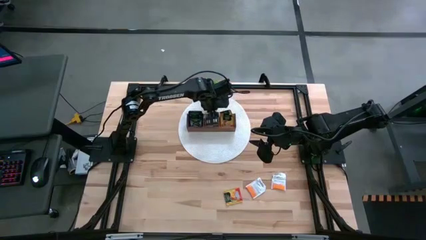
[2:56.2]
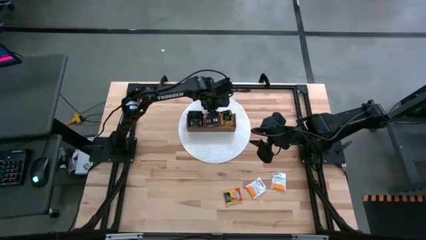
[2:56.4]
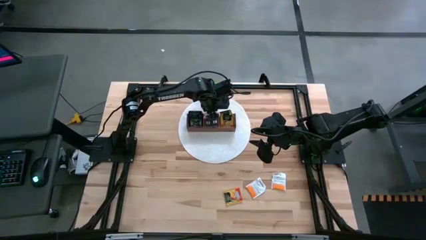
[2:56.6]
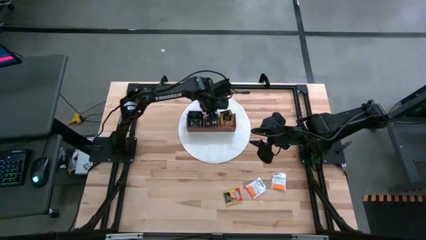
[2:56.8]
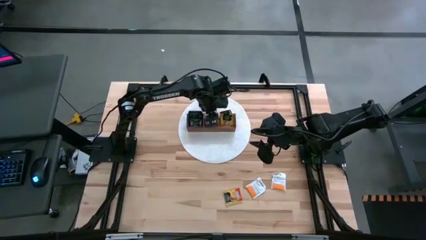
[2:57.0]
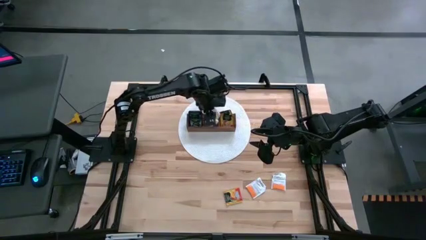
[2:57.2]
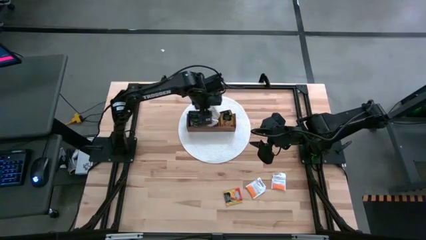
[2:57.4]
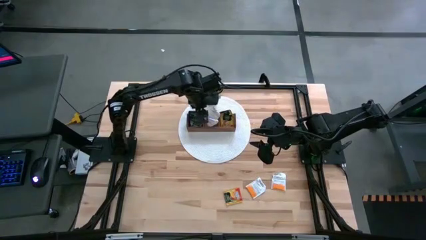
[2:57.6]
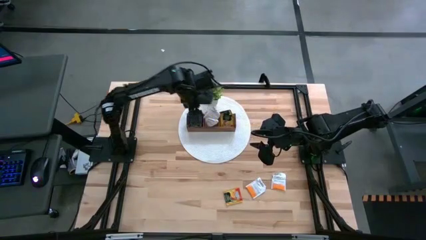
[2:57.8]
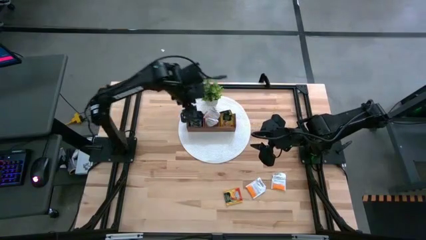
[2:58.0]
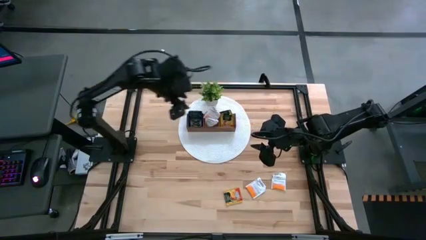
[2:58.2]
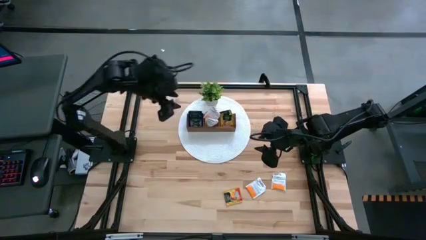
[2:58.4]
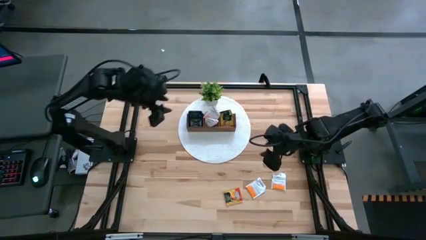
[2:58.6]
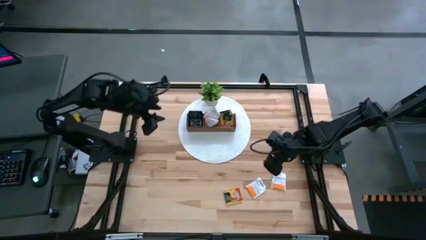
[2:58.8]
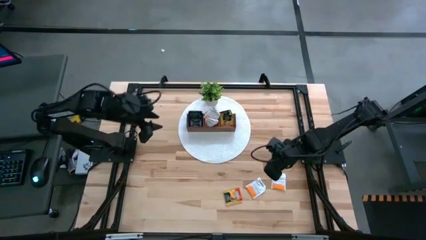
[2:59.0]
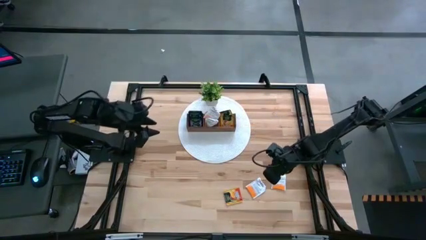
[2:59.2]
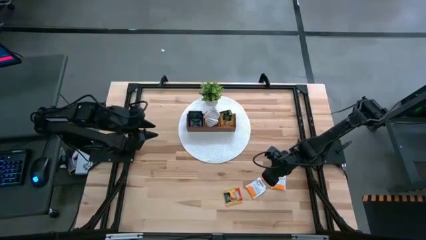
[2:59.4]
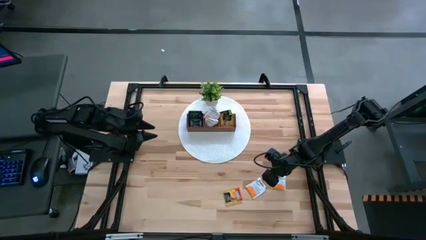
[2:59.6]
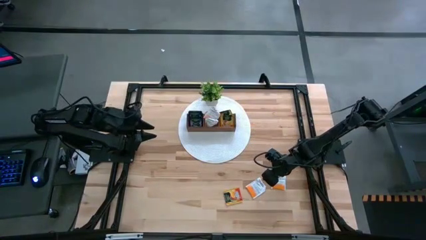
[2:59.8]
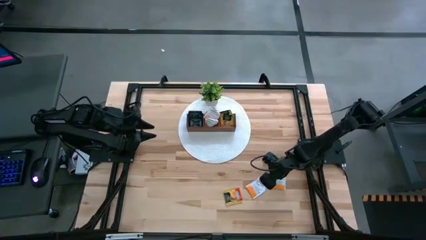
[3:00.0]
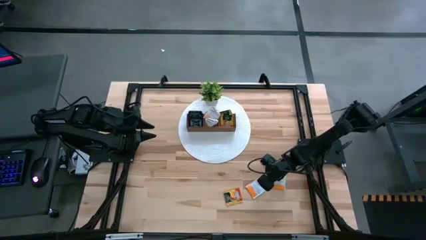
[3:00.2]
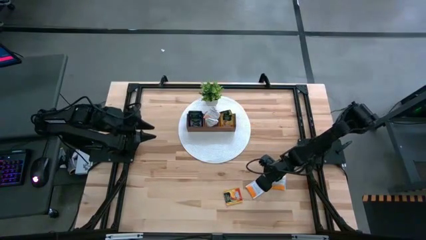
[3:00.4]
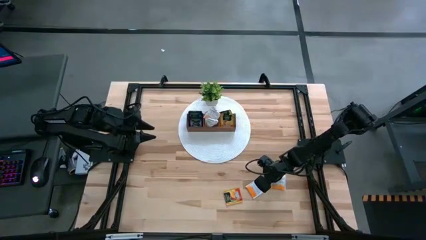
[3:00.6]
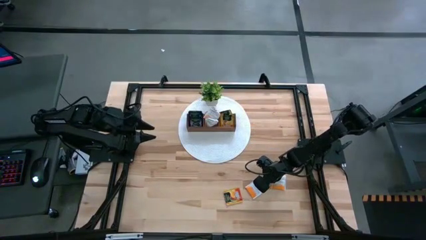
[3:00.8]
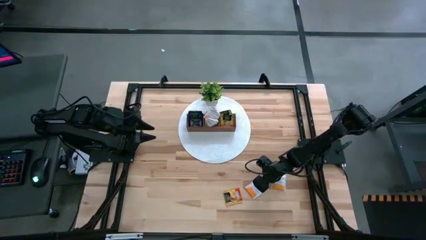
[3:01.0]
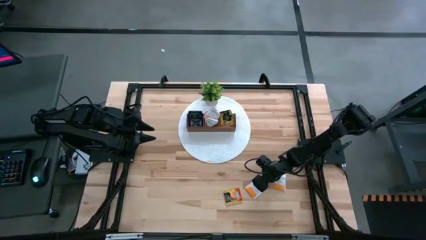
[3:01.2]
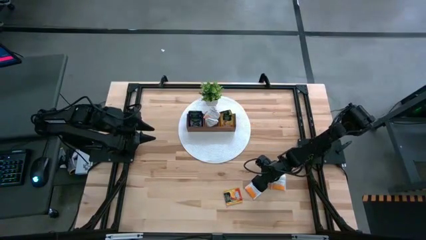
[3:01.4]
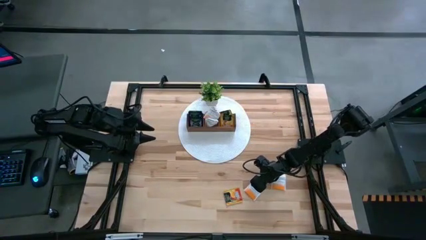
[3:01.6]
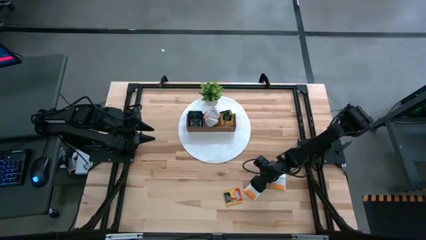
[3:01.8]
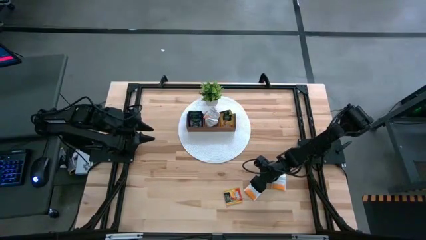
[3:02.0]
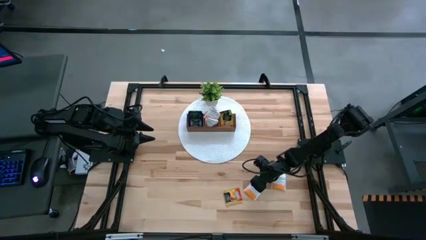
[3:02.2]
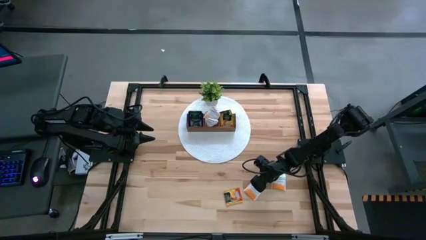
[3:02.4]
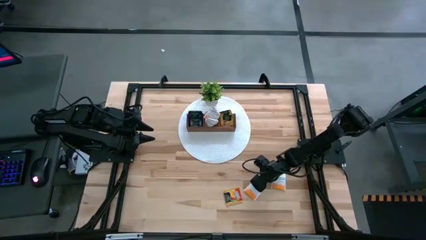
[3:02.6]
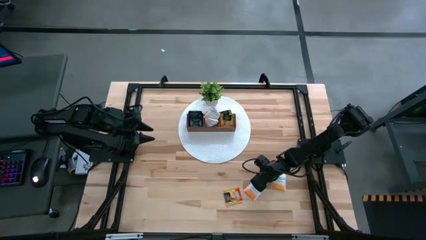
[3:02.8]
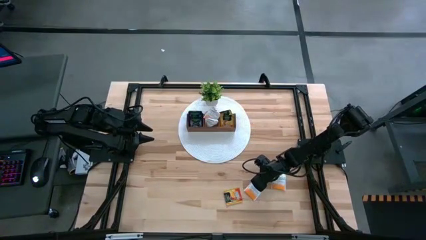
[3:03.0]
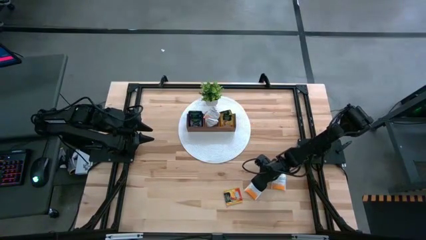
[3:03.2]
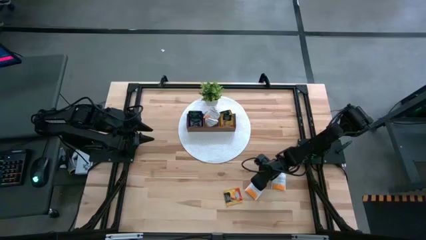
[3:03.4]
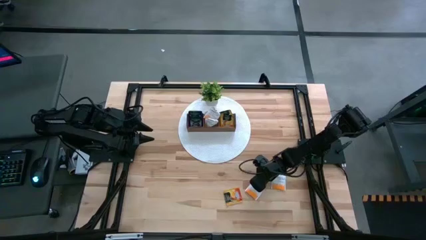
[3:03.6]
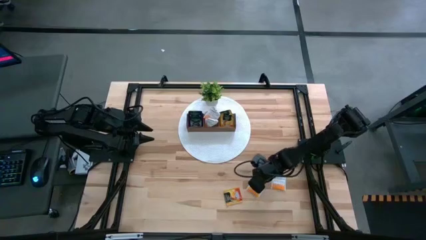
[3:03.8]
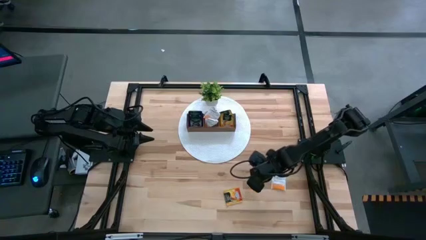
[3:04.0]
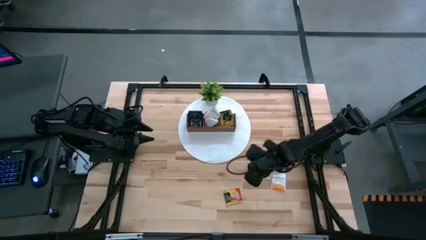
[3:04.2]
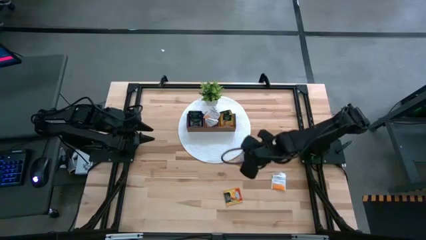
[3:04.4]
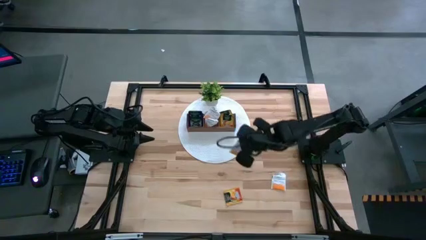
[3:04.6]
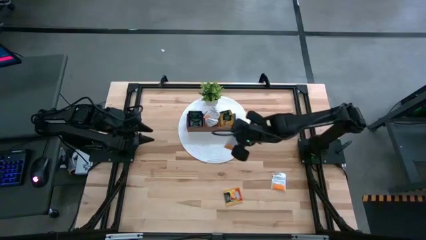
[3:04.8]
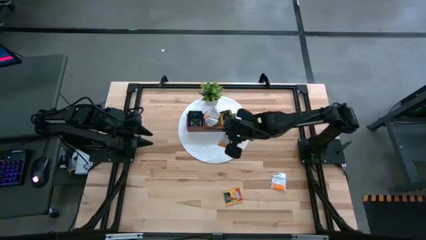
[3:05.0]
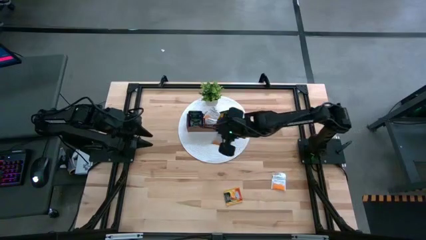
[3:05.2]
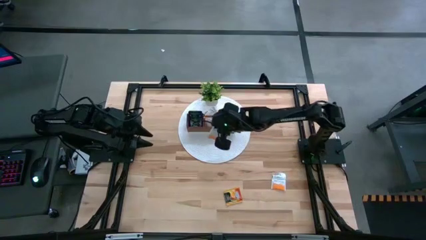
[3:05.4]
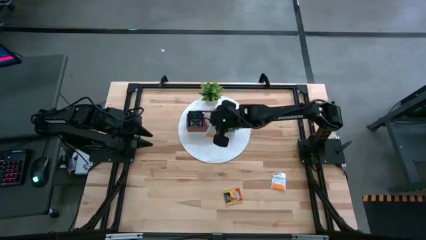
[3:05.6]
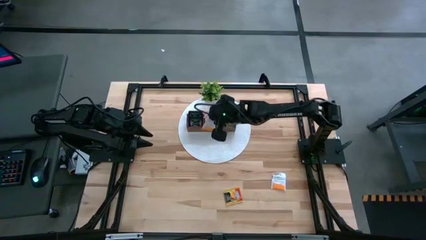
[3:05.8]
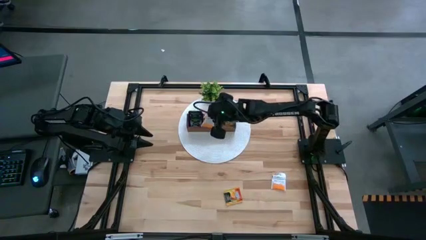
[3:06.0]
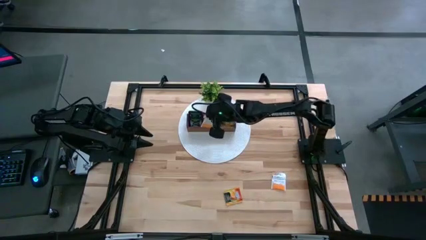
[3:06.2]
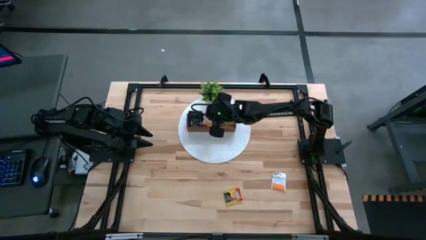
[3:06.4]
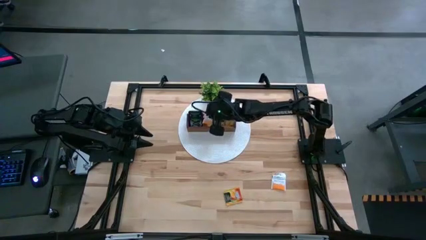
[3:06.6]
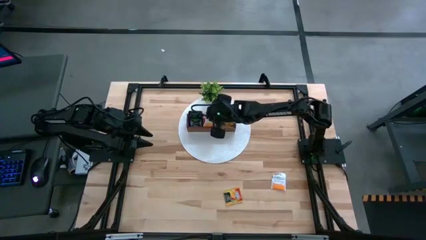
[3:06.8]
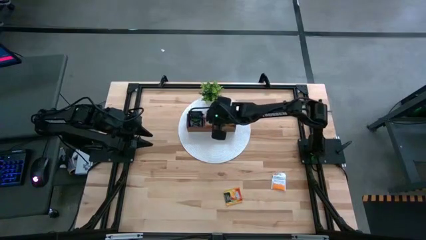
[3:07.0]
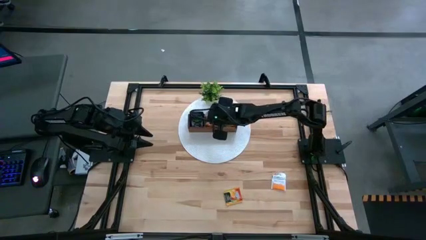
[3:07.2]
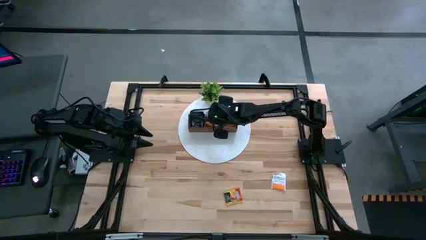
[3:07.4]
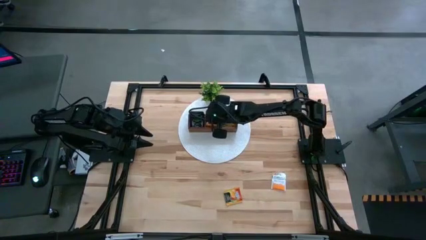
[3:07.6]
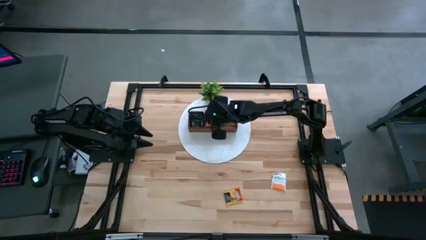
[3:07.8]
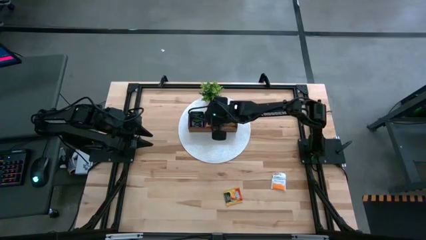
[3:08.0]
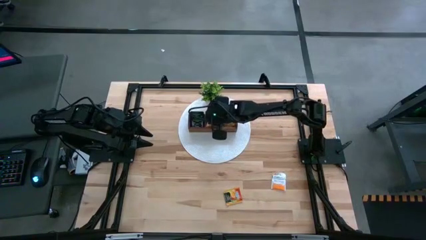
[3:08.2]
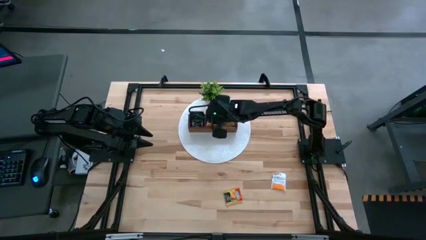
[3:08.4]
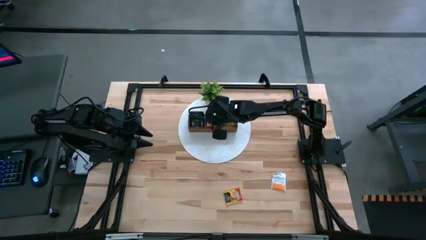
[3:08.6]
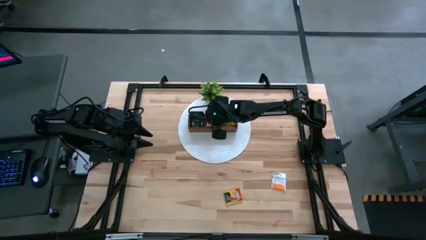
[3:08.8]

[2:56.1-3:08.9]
Task: Pick & Place Tea
Put the white orange tea bag into the middle section of the wooden organizer

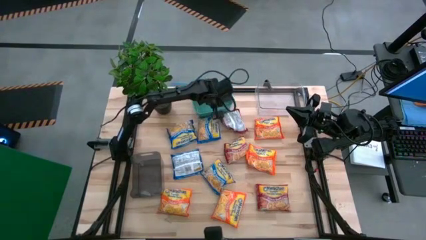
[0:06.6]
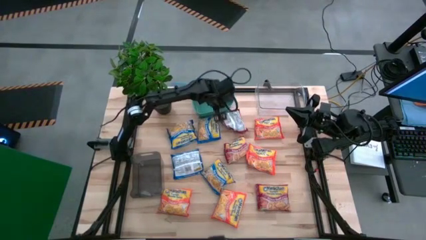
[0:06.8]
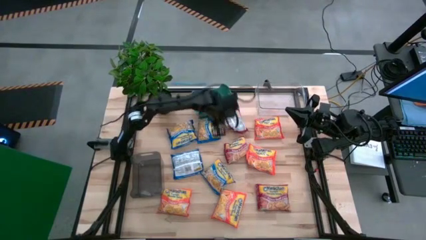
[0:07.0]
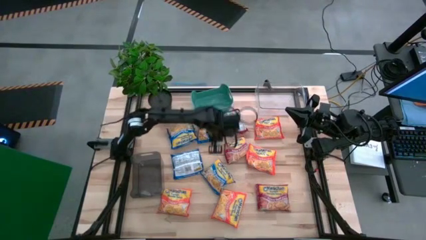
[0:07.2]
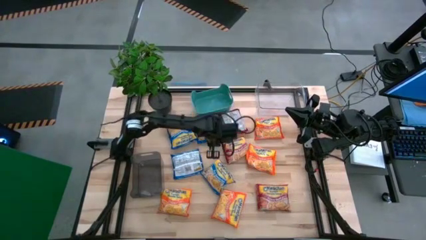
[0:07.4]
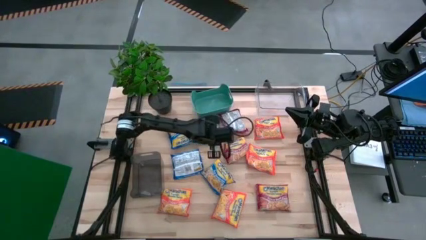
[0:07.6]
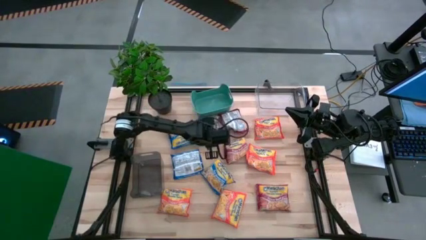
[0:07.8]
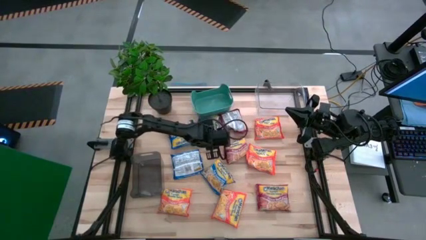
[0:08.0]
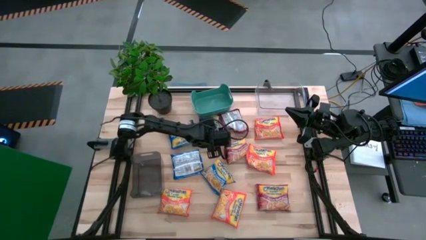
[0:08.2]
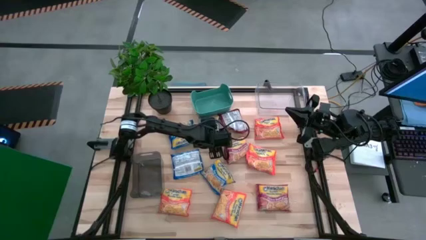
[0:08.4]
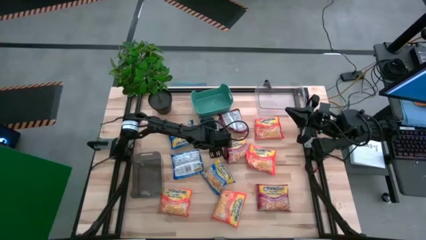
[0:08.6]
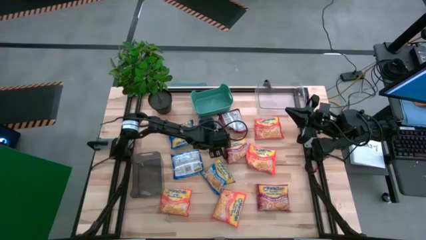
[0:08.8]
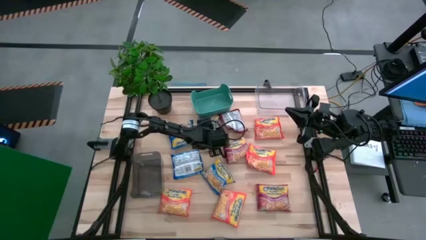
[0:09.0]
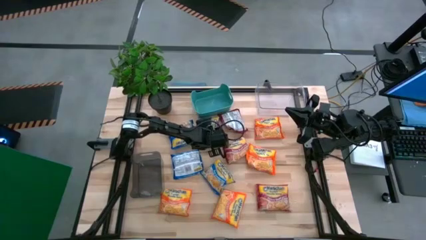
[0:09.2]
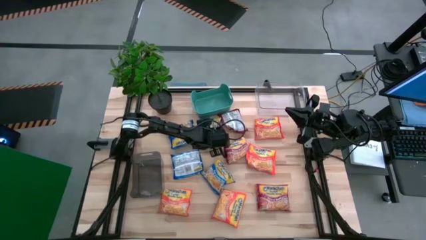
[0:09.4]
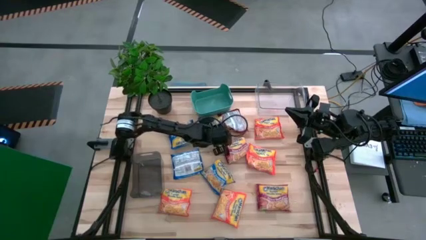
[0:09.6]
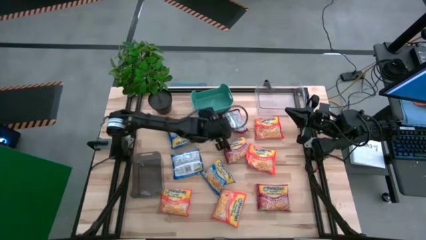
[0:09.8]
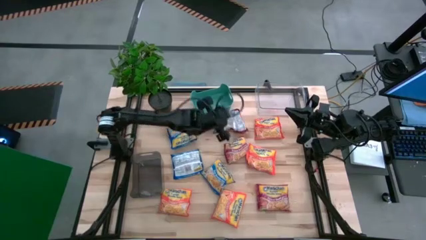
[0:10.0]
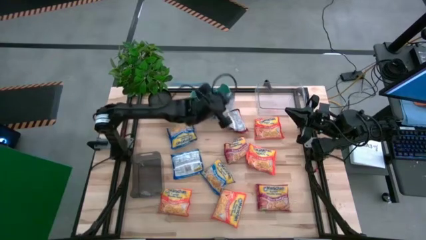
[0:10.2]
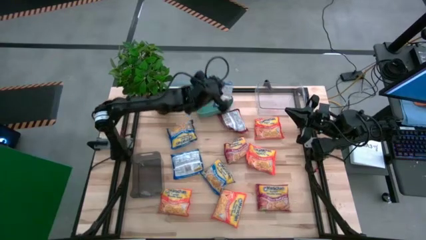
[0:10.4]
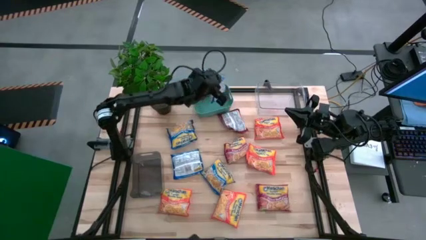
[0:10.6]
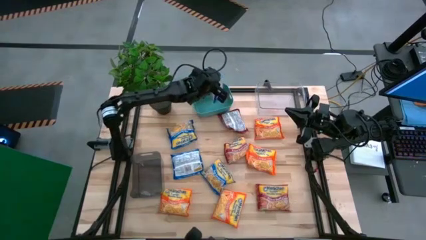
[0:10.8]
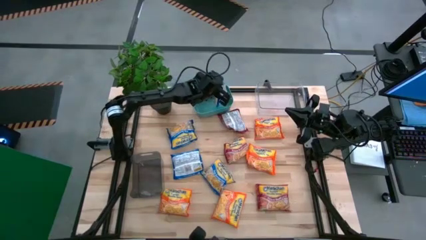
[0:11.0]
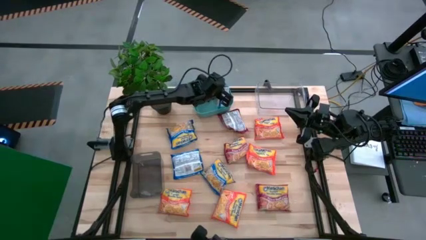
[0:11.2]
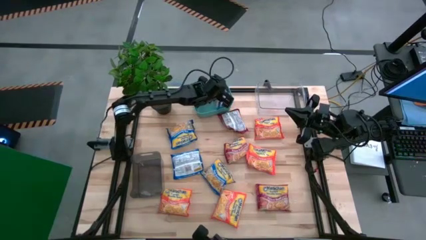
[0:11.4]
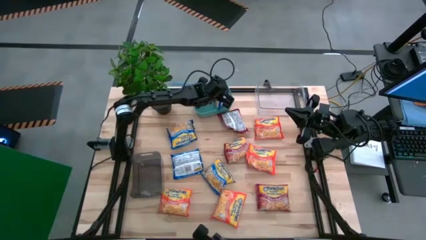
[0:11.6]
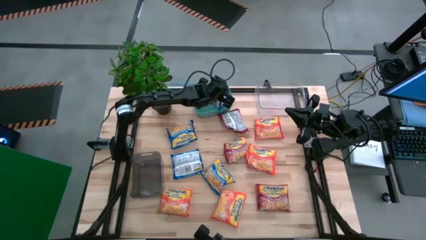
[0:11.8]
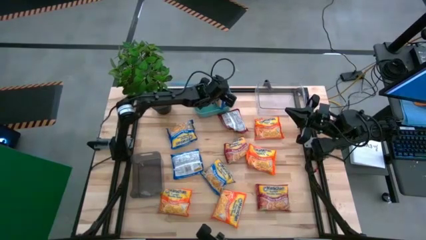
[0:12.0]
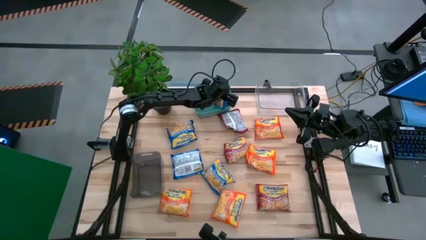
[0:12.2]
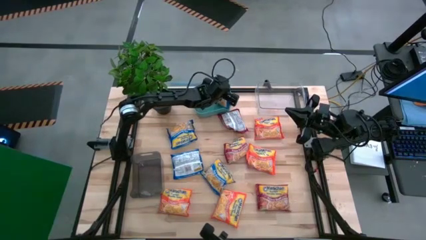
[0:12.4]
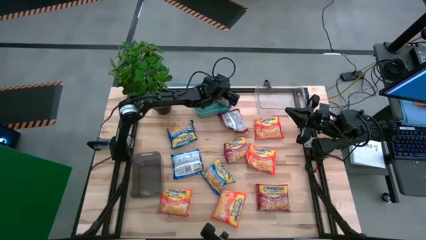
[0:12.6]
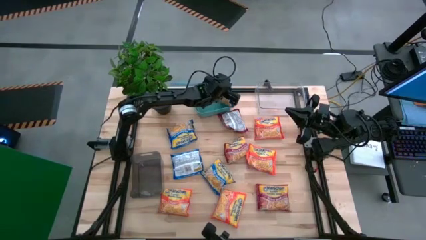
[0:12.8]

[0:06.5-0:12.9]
Task: Sort Maruchan noodles
Put the top right blue noodle pack into the green bin
